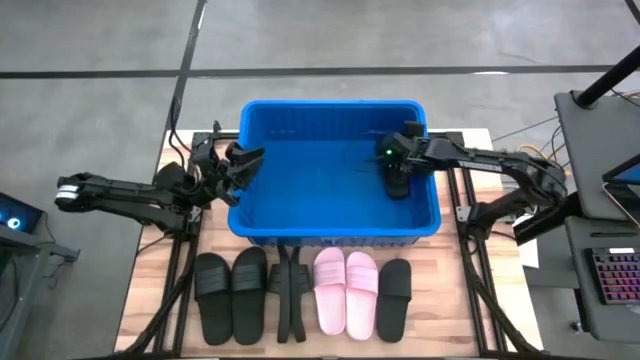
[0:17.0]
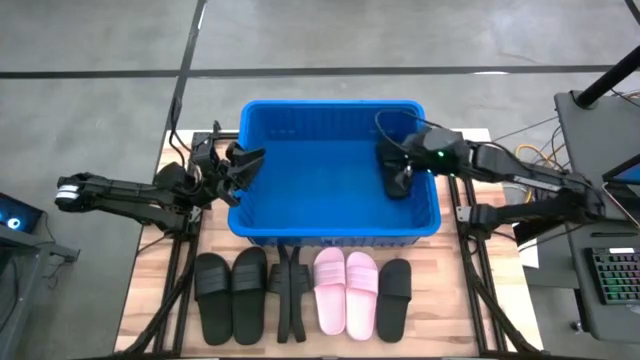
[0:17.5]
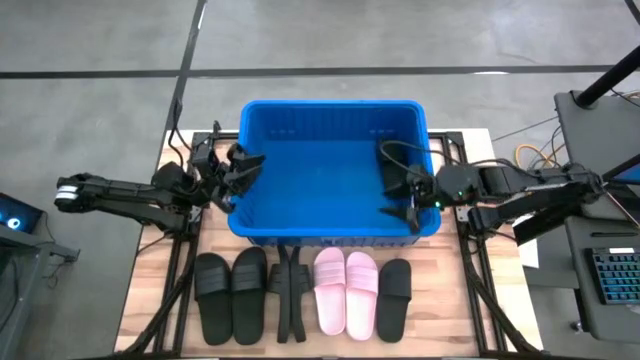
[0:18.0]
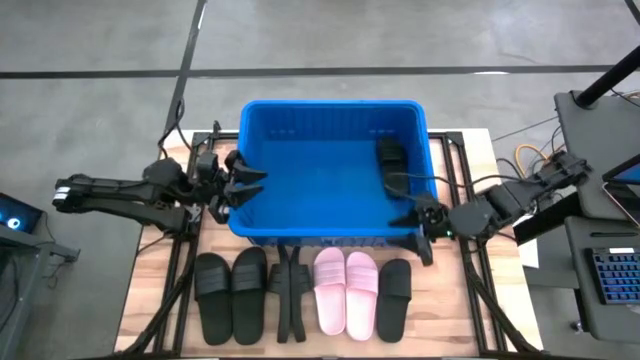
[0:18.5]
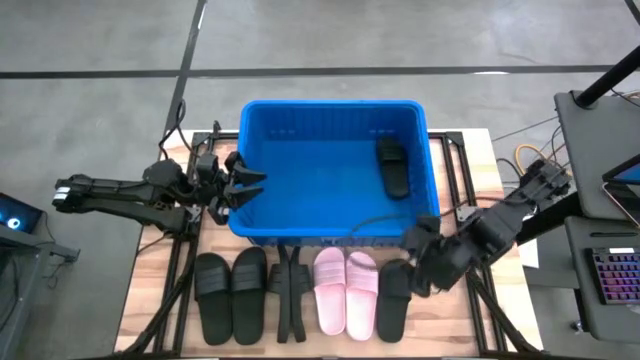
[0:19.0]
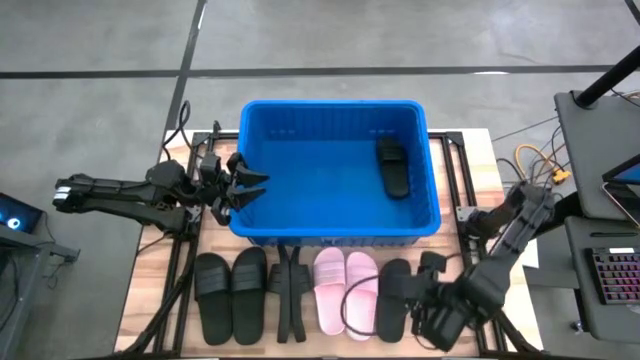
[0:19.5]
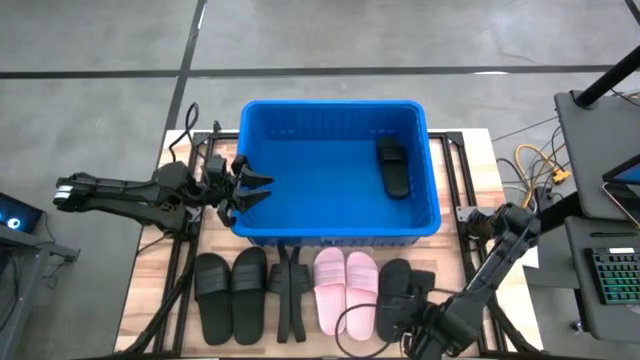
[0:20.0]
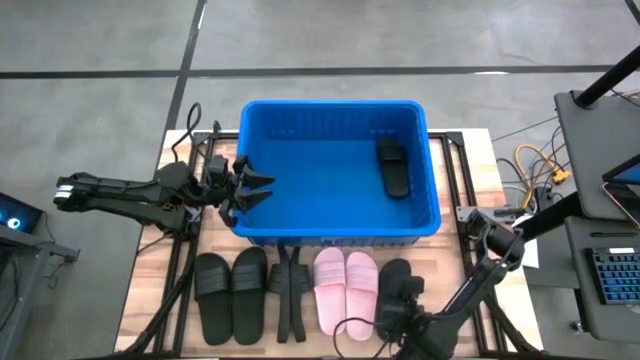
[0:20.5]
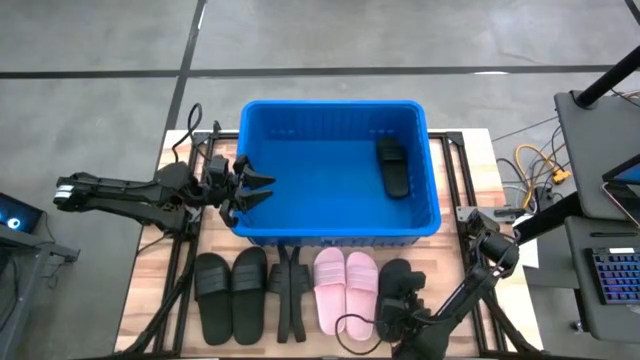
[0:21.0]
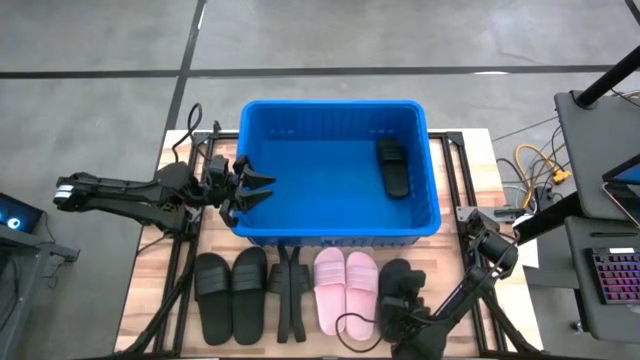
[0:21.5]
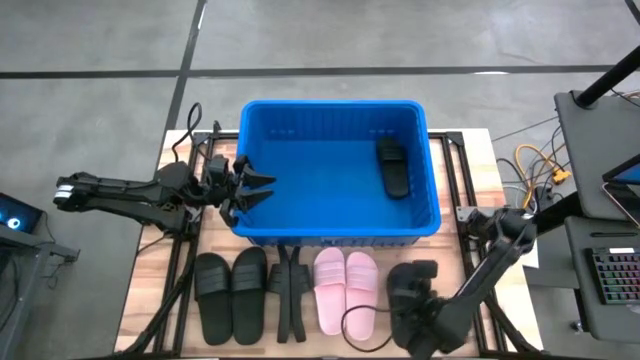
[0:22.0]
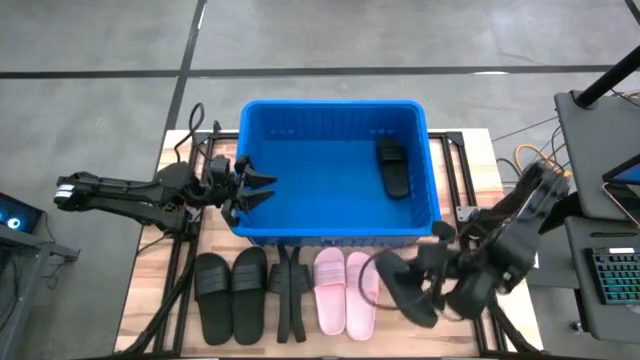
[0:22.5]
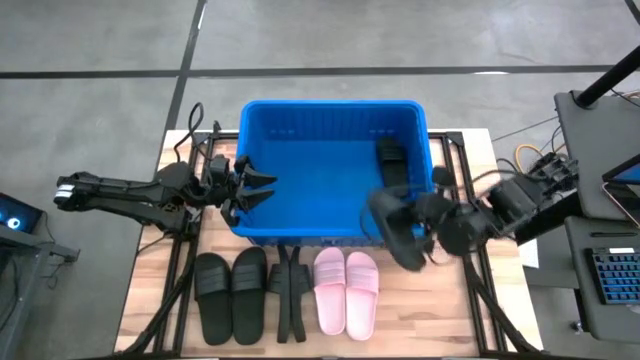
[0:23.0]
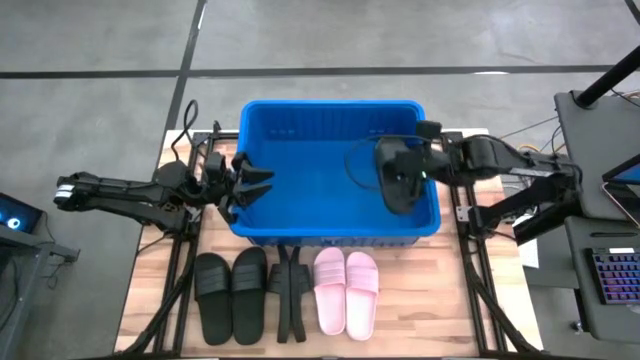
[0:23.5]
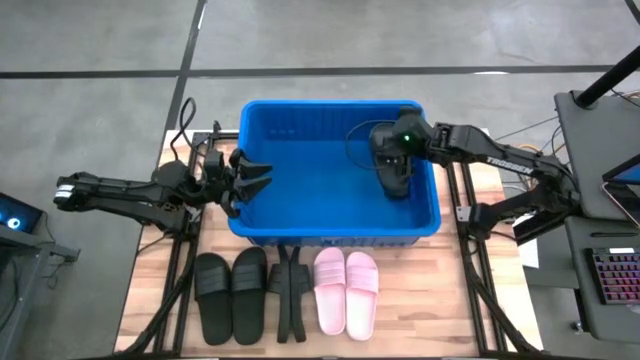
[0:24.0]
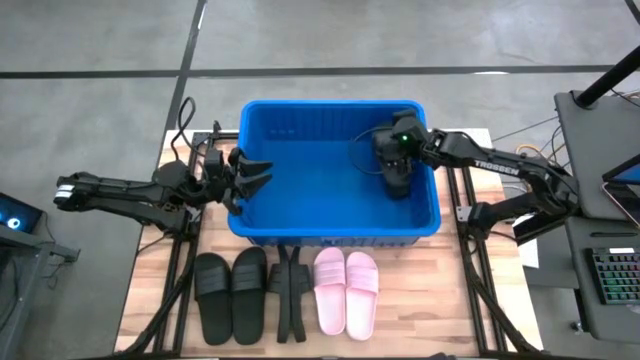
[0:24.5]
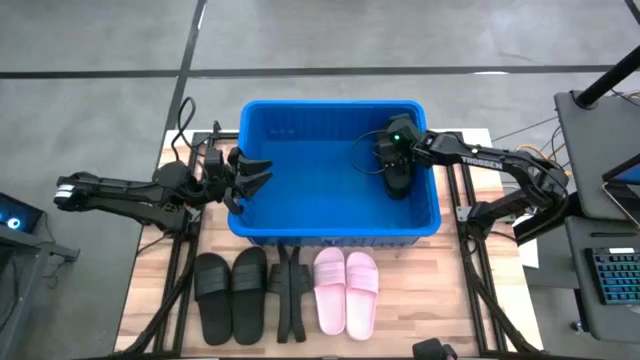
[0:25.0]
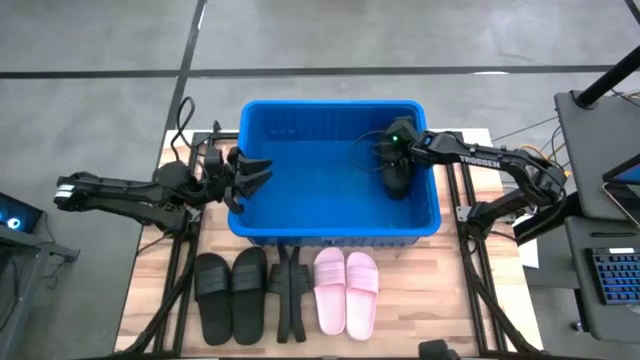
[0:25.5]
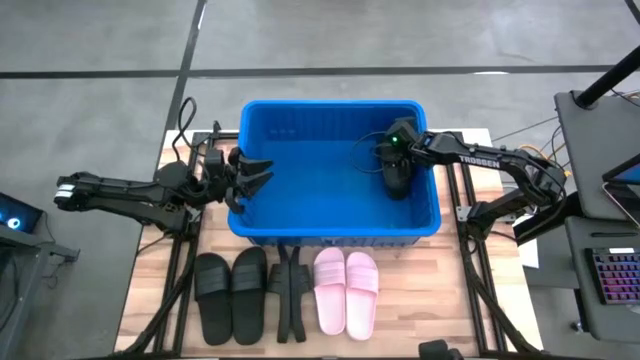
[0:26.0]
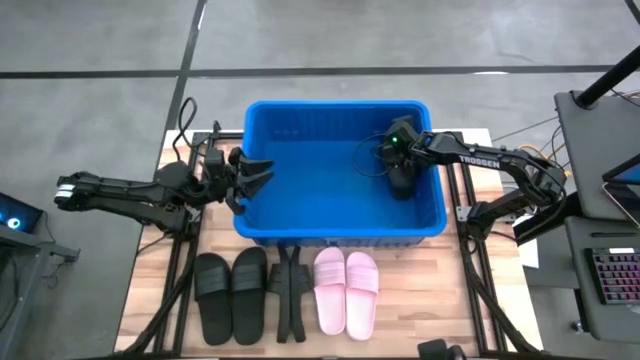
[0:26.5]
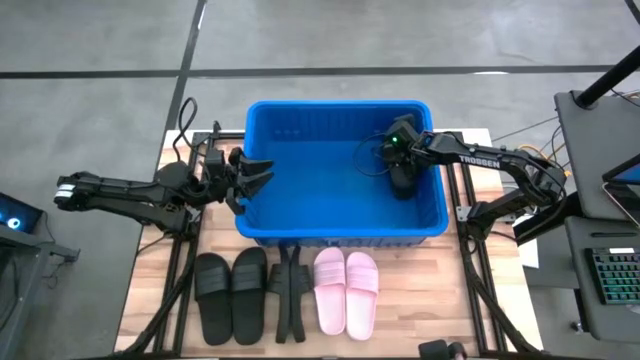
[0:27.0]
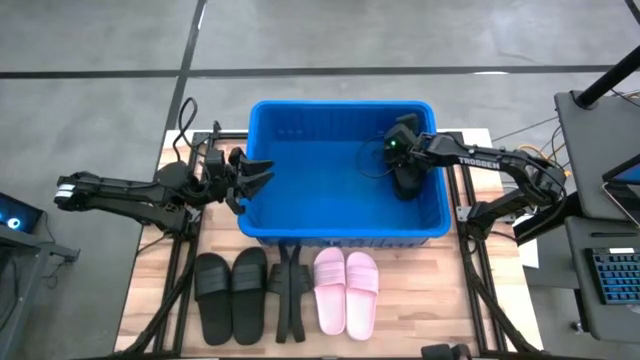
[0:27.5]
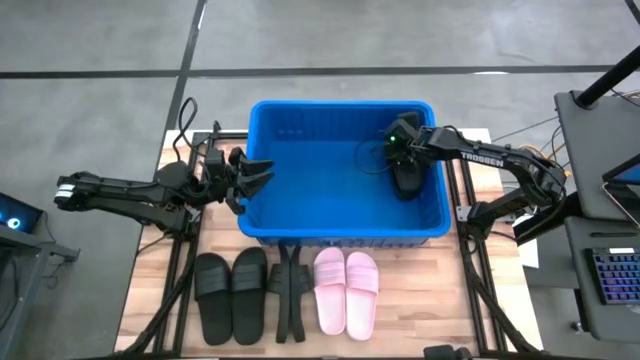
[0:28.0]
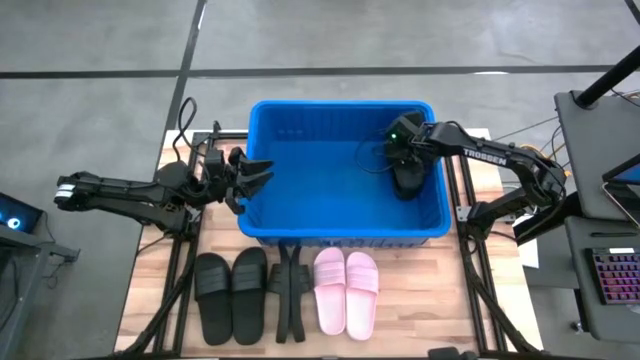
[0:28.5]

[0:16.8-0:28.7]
Task: Pick and place slides into bin
Put the black slide into the blue bin

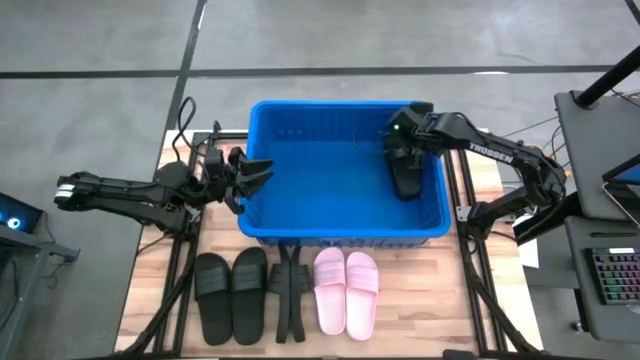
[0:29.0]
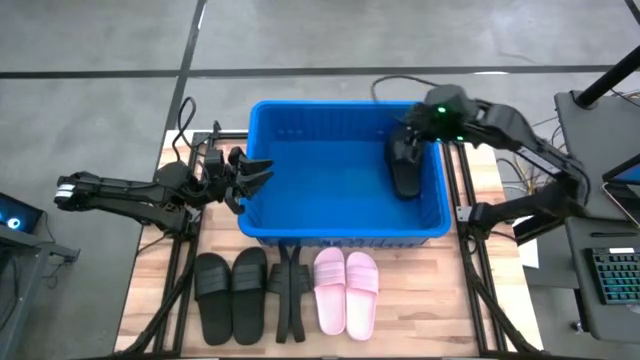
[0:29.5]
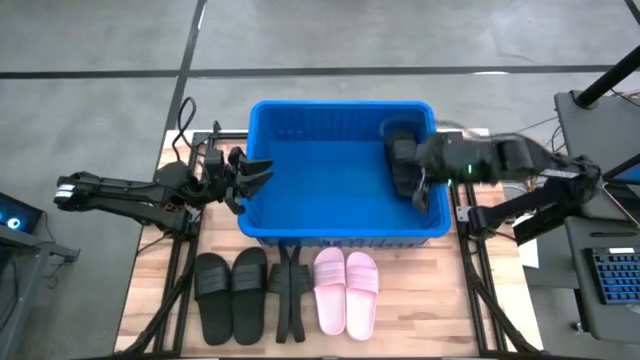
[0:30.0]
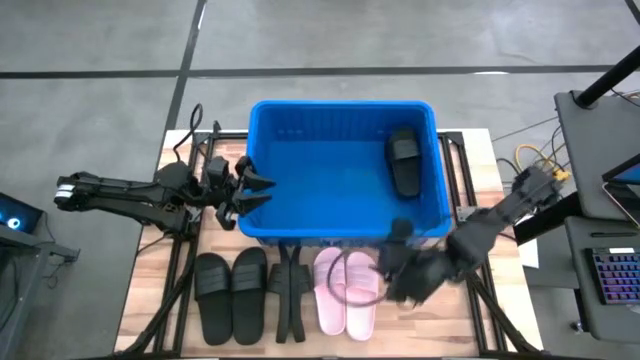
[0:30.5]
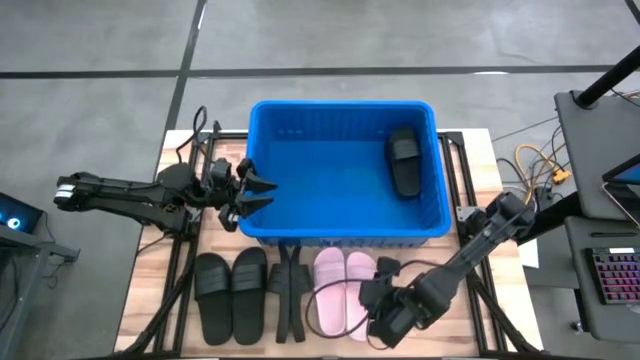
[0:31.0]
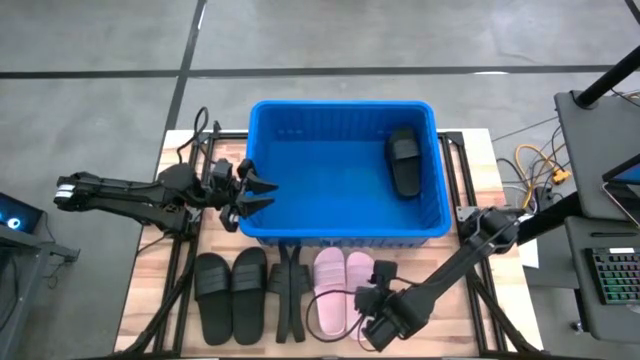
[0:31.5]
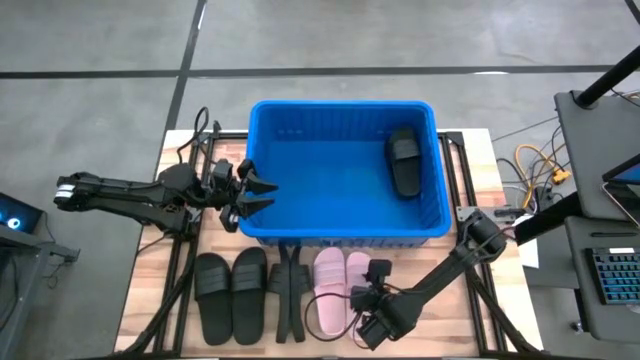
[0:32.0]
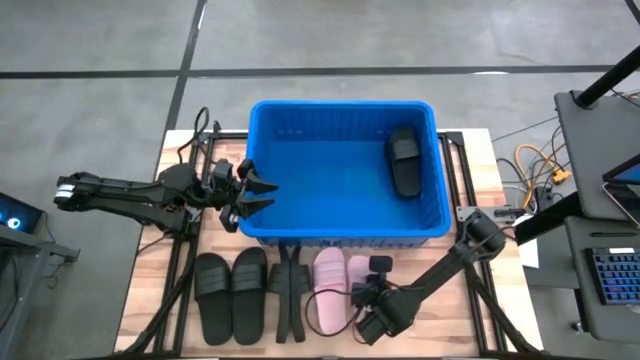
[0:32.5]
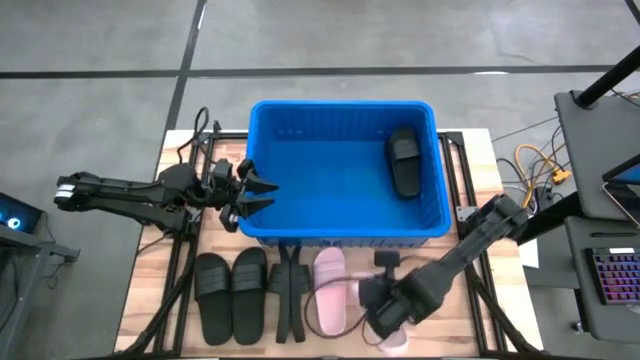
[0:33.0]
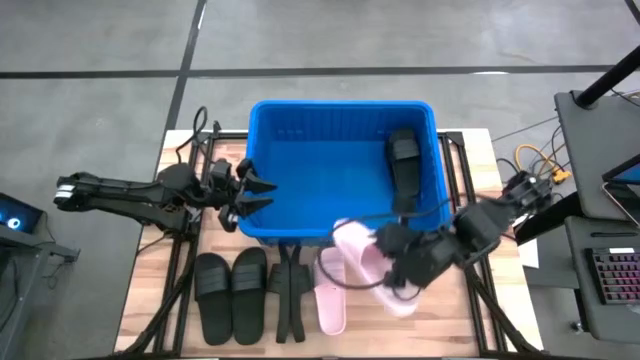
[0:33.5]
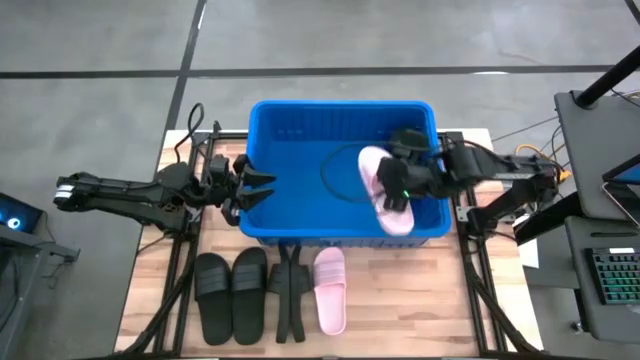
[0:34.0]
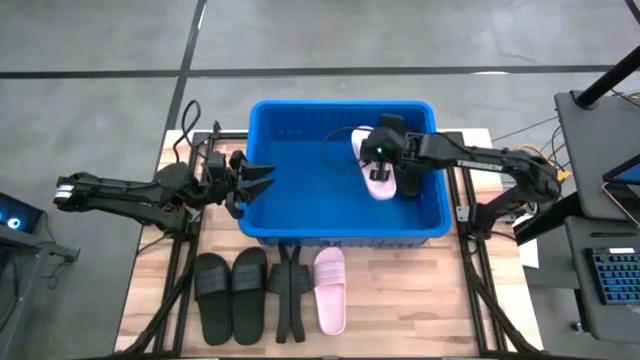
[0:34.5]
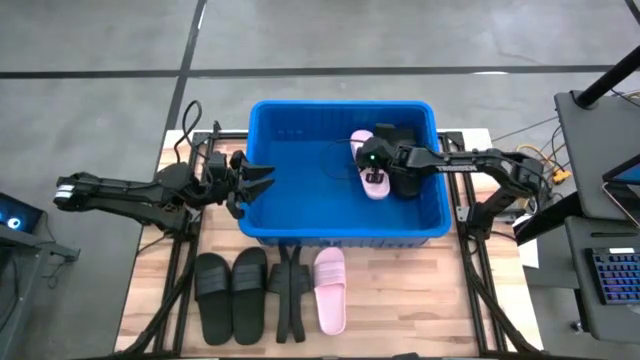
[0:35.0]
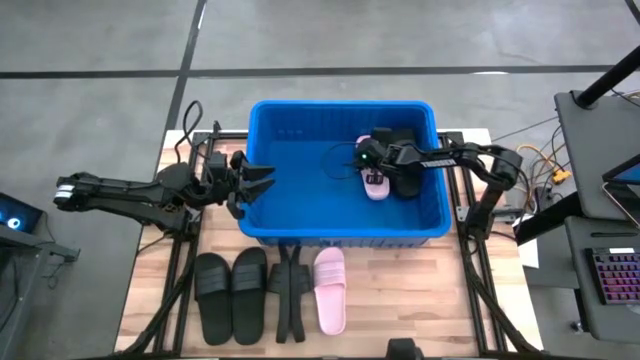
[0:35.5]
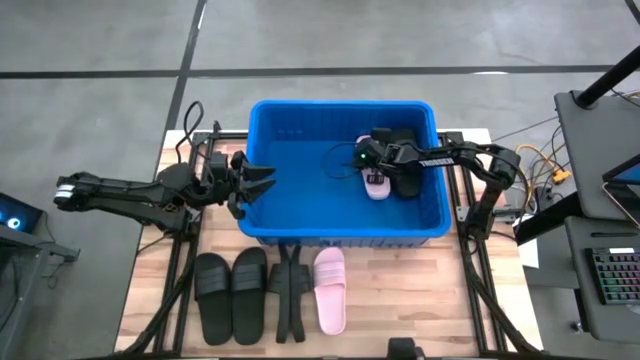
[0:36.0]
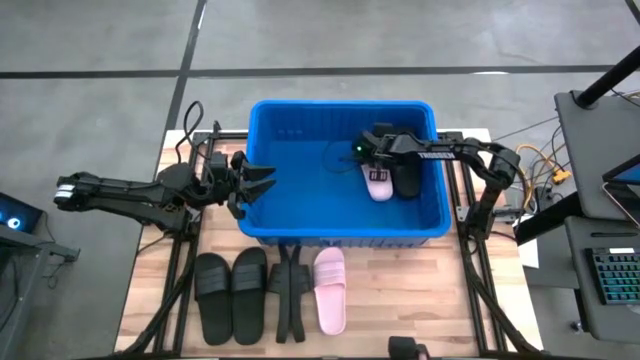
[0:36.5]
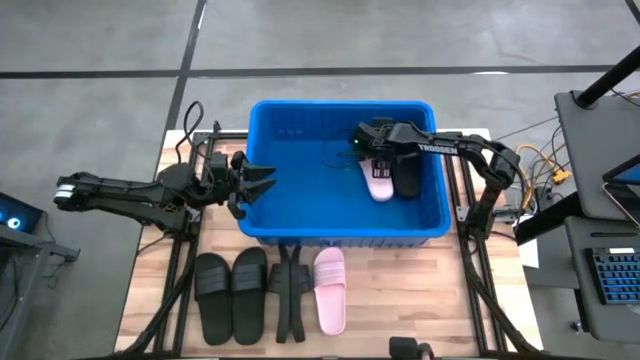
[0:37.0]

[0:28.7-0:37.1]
Put the right pink slide into the blue bin

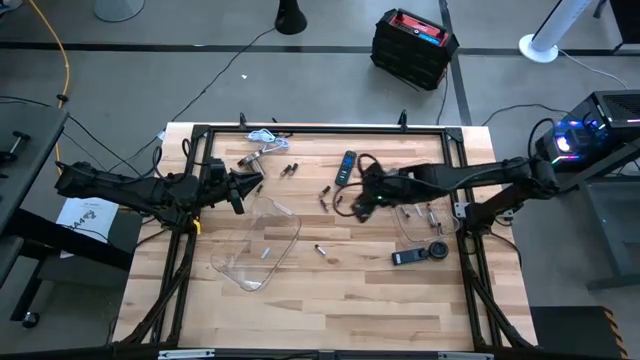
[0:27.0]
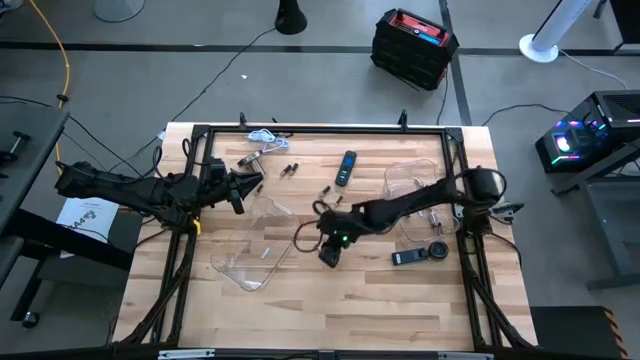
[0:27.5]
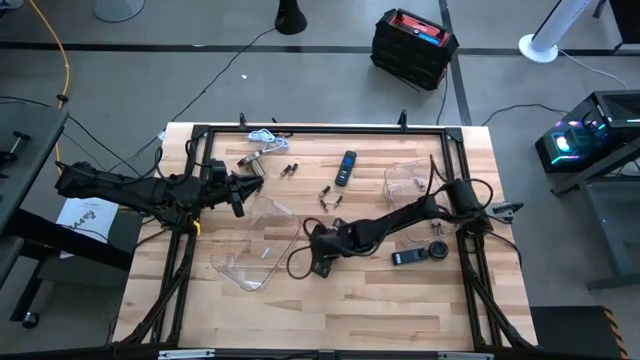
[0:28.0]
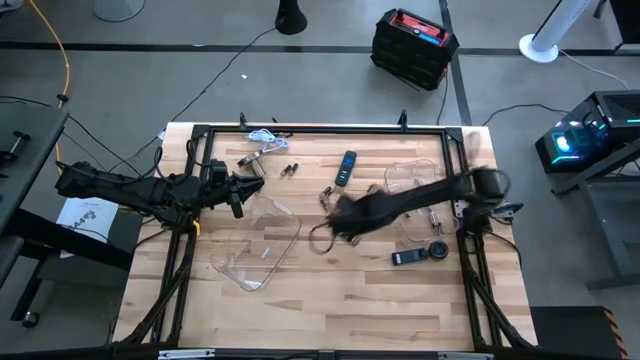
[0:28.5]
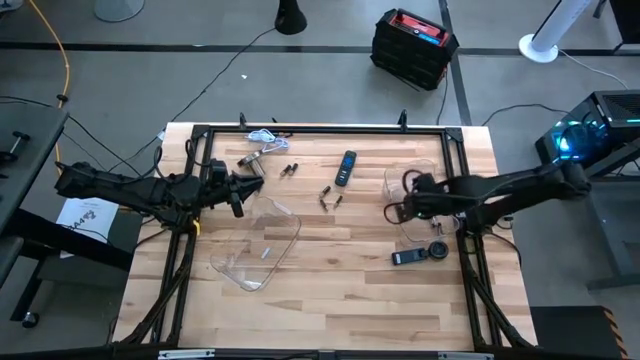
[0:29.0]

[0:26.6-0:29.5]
Task: Sort batteries
Put the white battery into the right transparent bin
